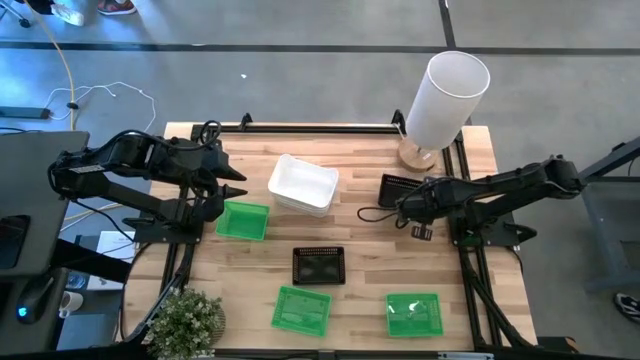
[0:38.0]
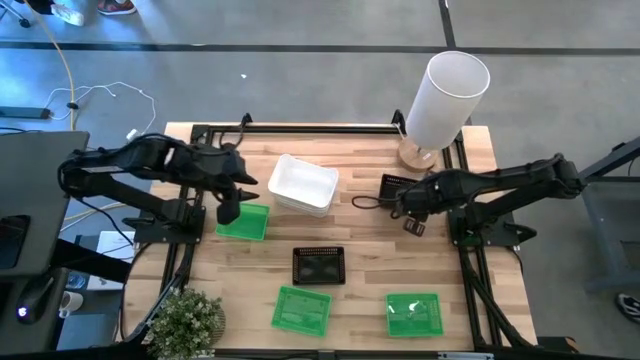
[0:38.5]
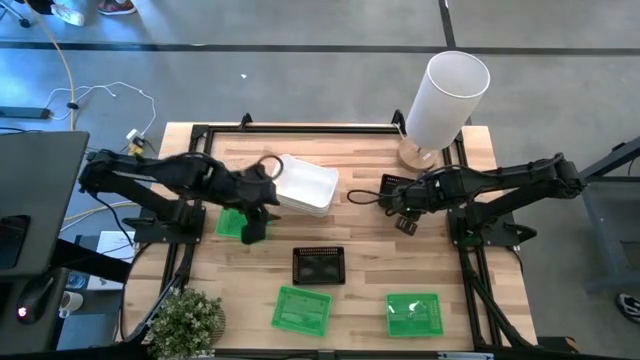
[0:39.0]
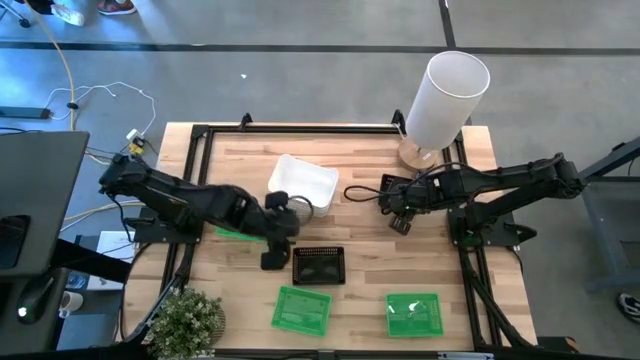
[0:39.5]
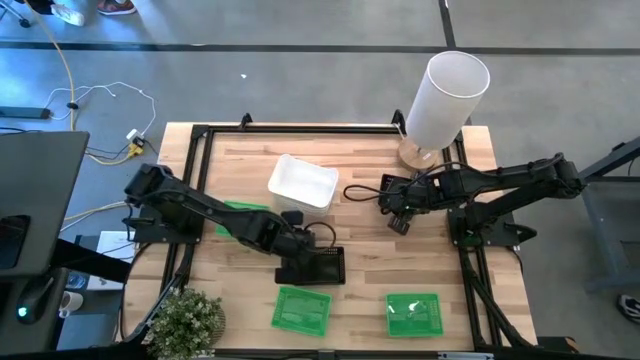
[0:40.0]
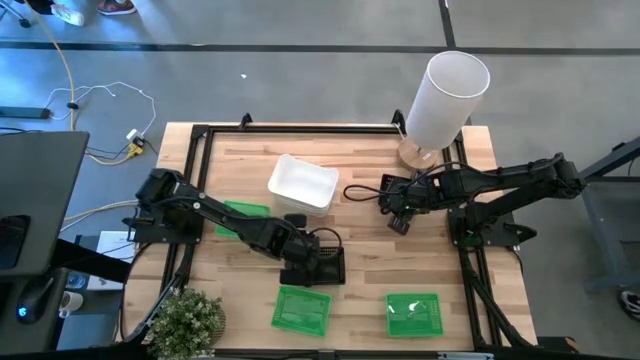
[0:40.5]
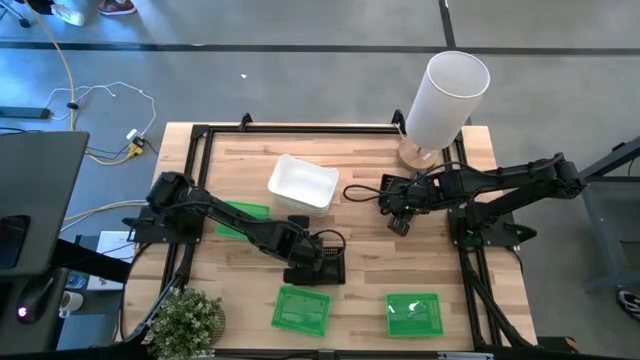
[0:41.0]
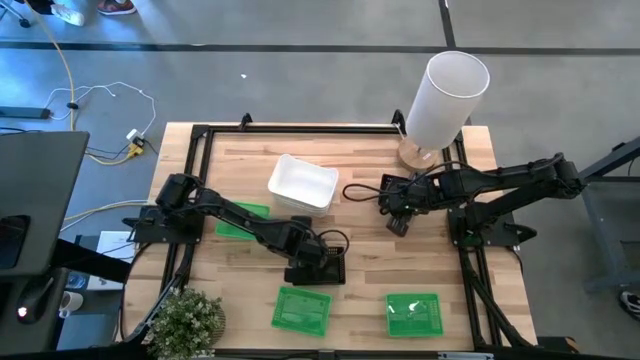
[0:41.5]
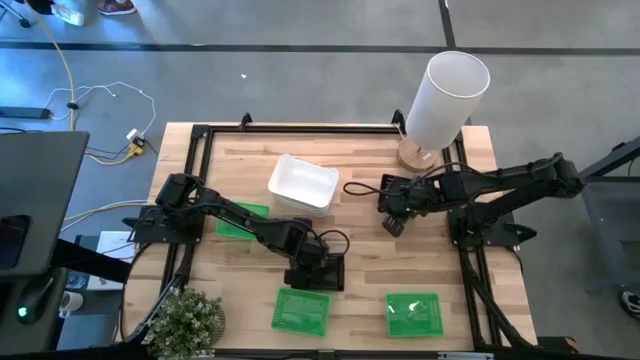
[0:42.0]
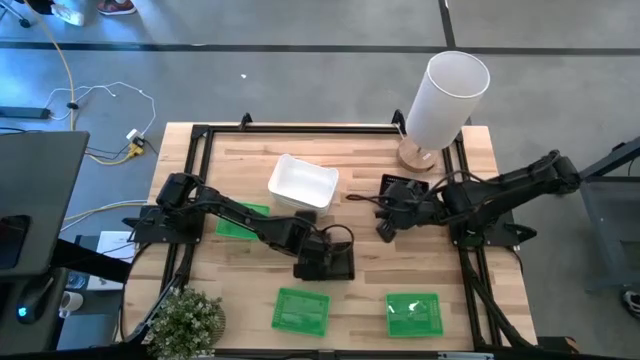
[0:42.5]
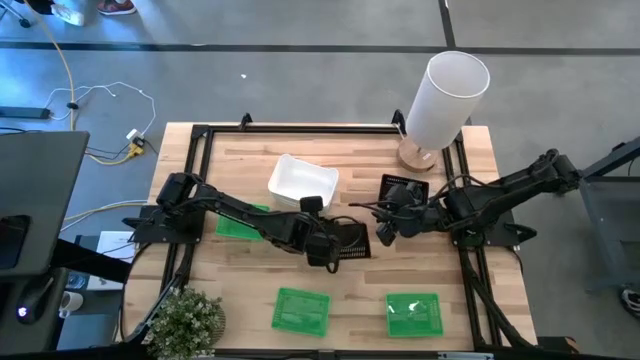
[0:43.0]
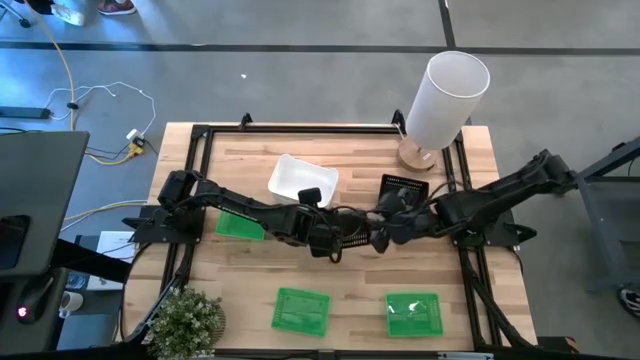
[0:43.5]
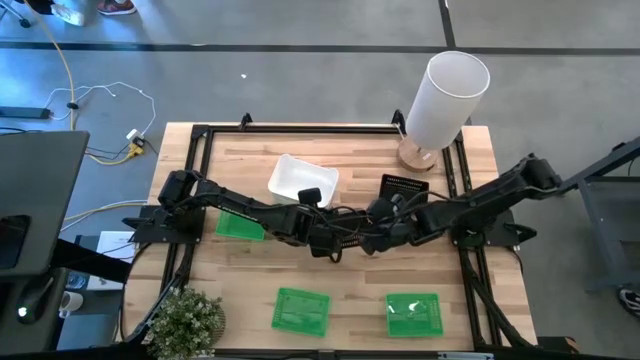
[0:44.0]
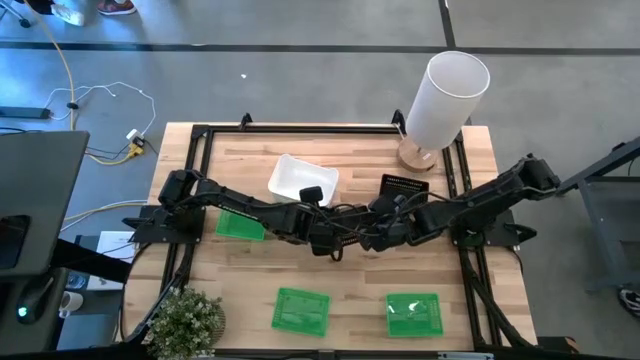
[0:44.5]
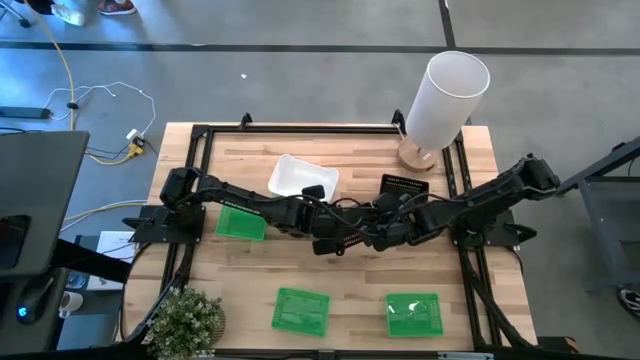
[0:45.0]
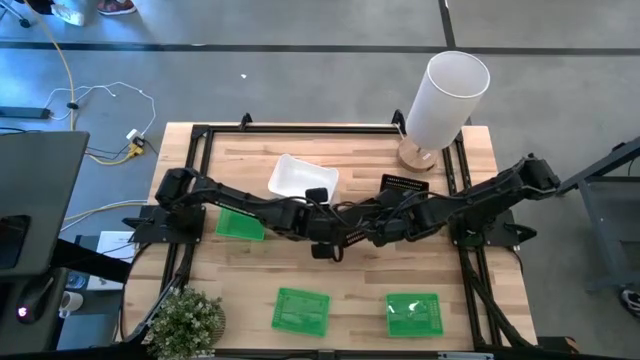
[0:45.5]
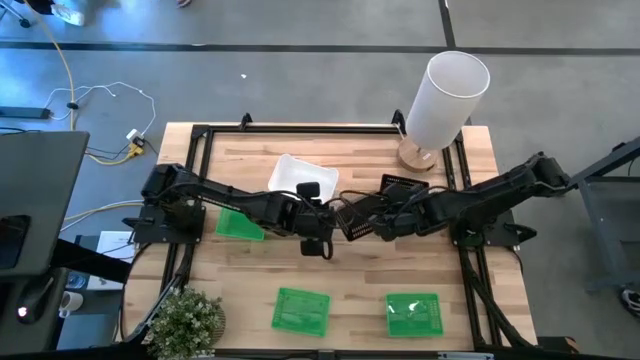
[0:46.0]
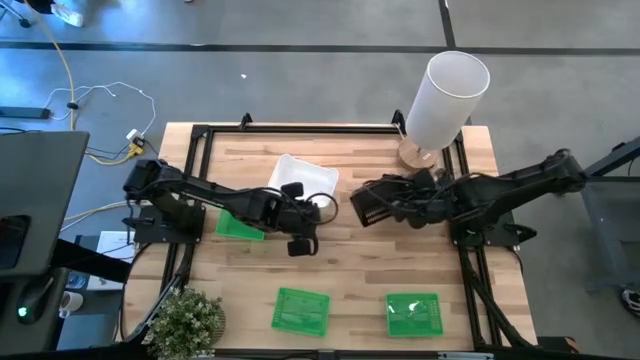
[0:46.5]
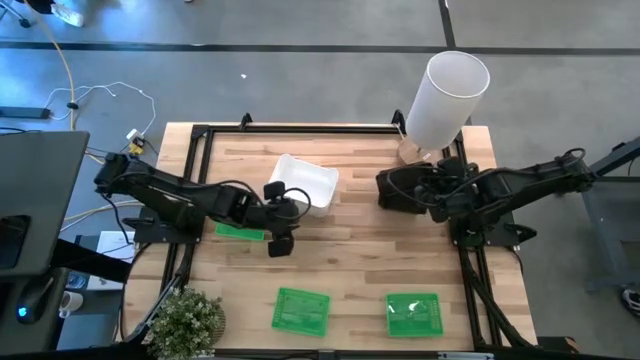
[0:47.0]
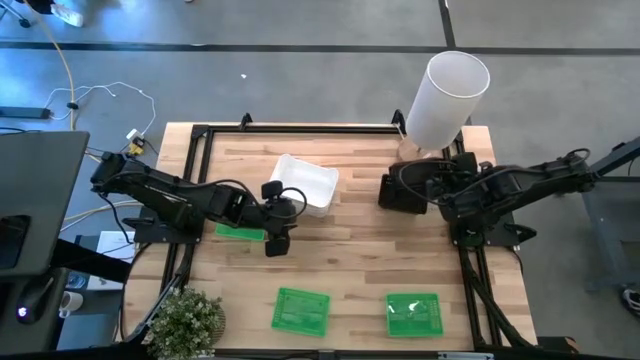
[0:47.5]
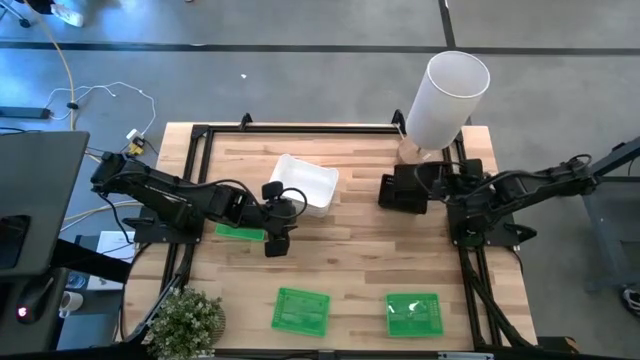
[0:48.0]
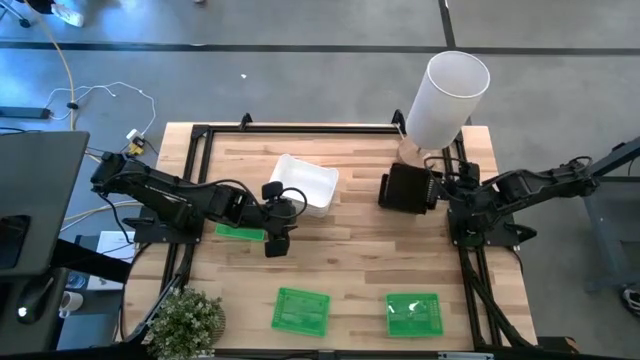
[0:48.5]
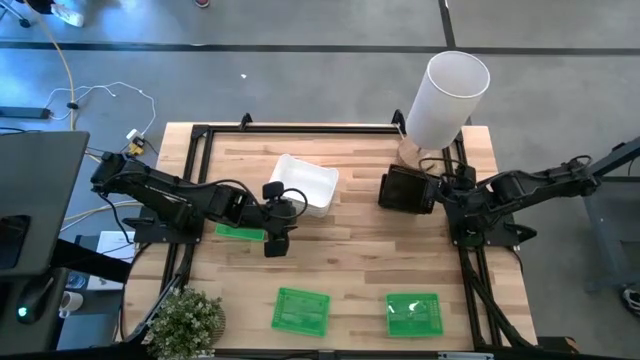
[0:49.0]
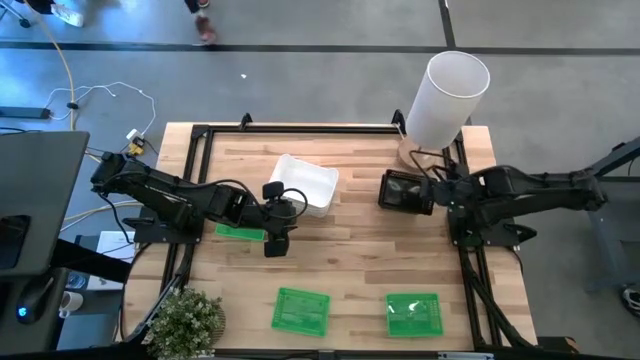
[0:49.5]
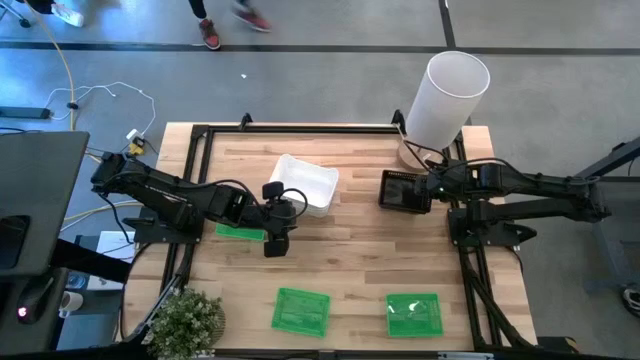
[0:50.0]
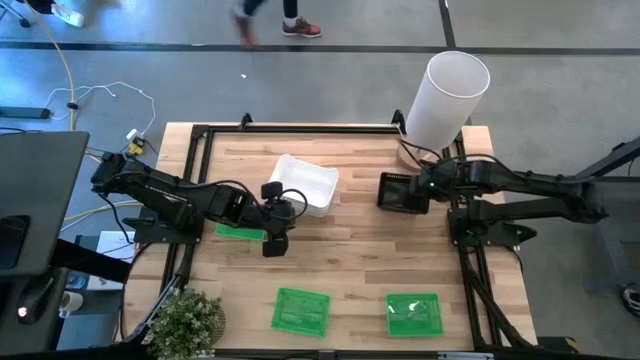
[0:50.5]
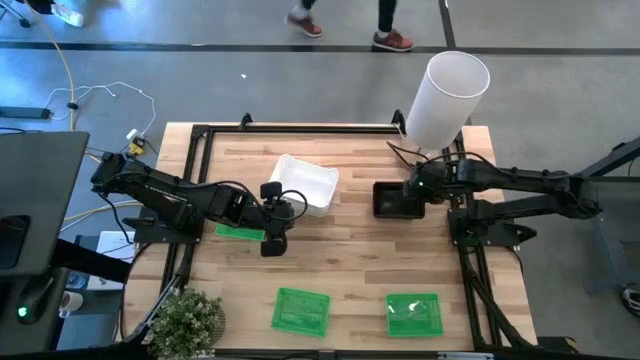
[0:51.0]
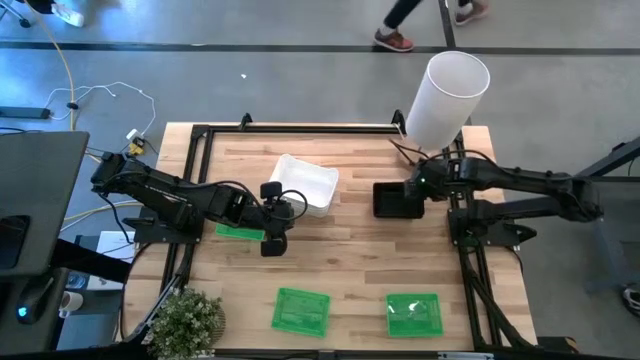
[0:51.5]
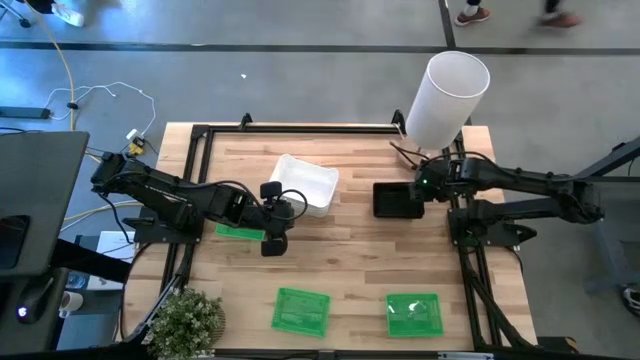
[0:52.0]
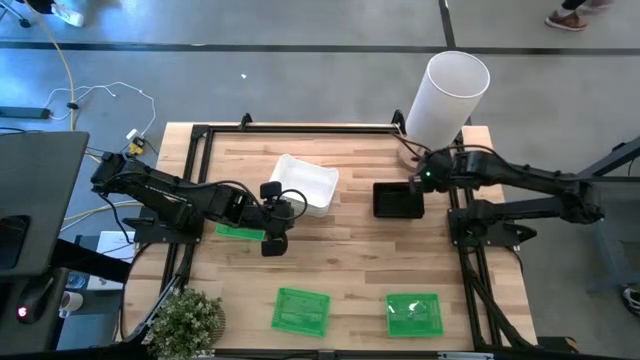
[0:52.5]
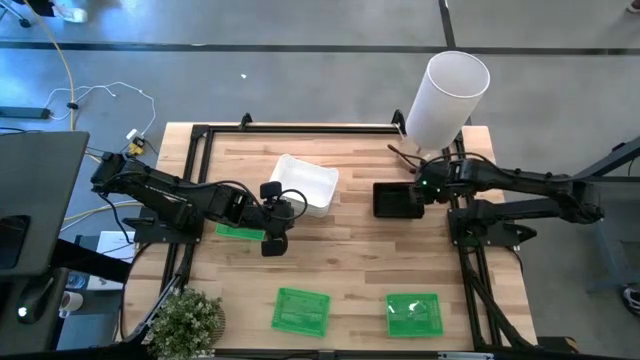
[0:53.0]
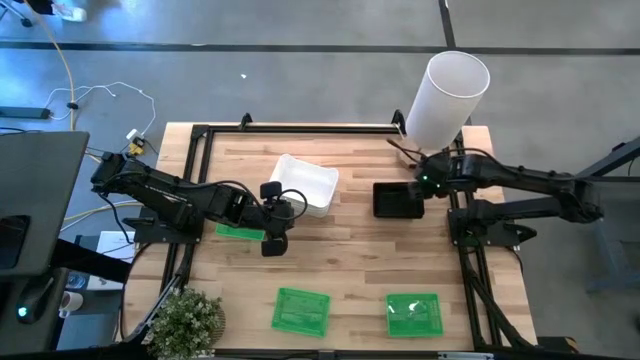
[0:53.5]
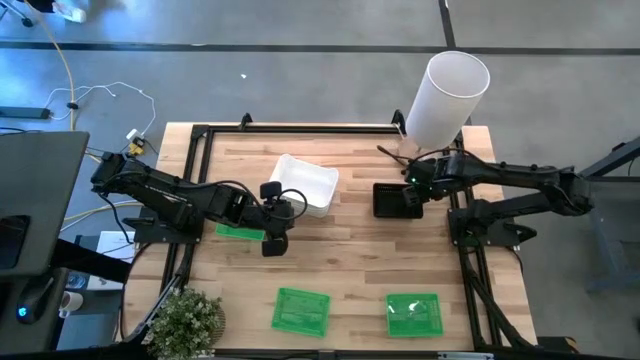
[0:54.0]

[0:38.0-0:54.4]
Stack the bottom black bin on top of the other black bins

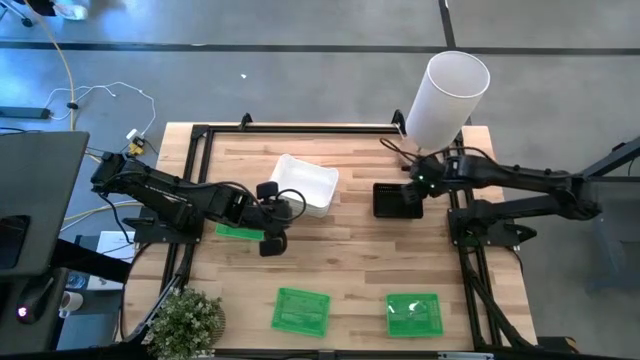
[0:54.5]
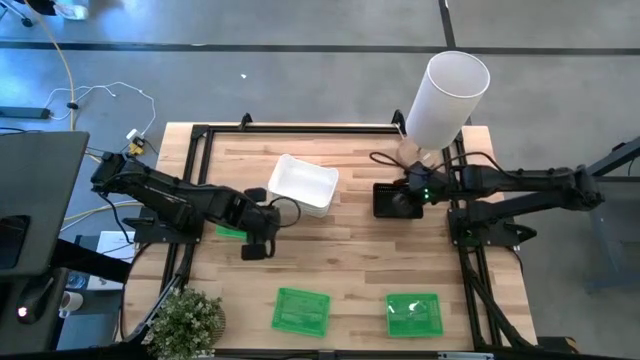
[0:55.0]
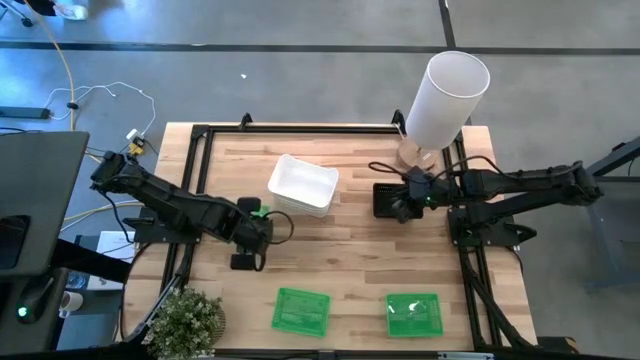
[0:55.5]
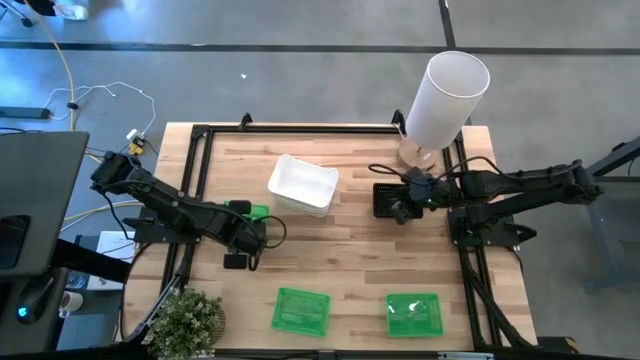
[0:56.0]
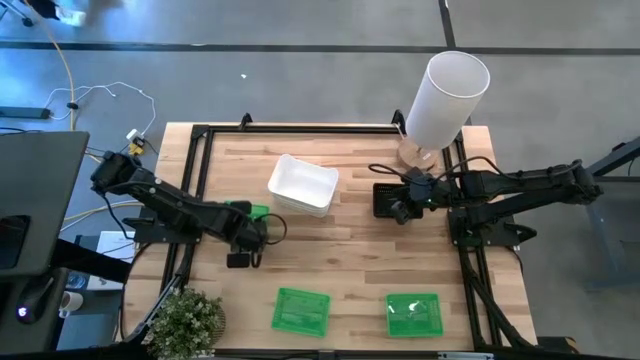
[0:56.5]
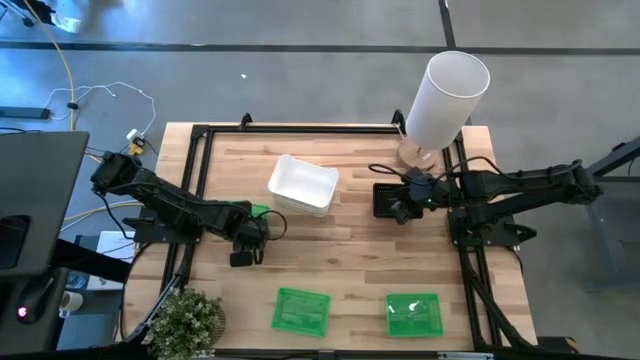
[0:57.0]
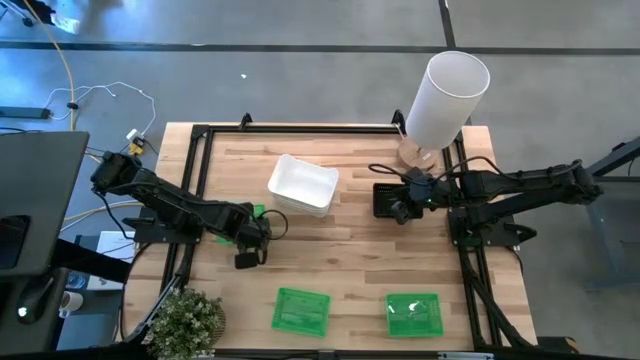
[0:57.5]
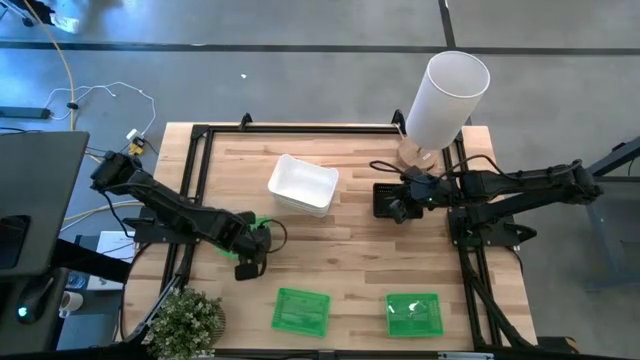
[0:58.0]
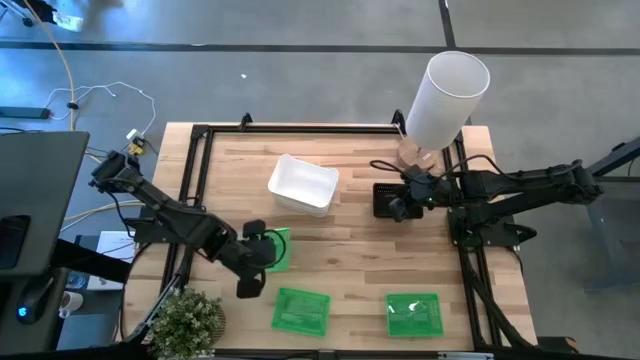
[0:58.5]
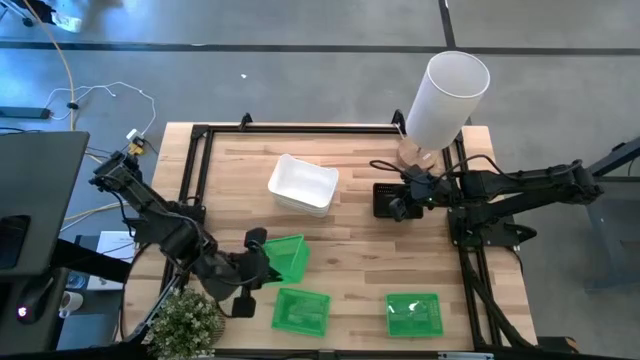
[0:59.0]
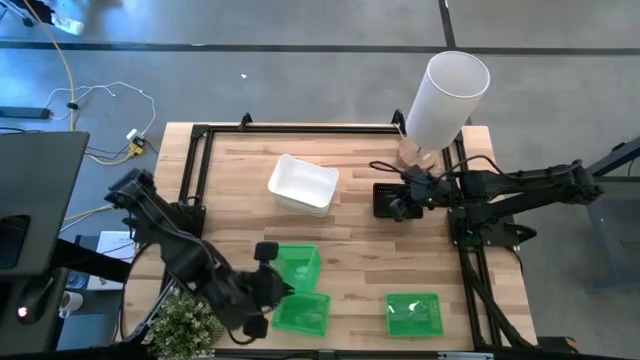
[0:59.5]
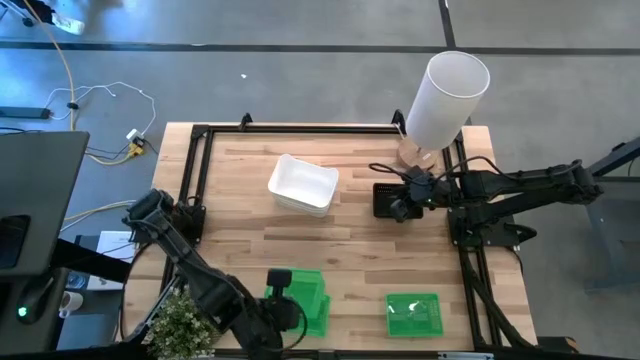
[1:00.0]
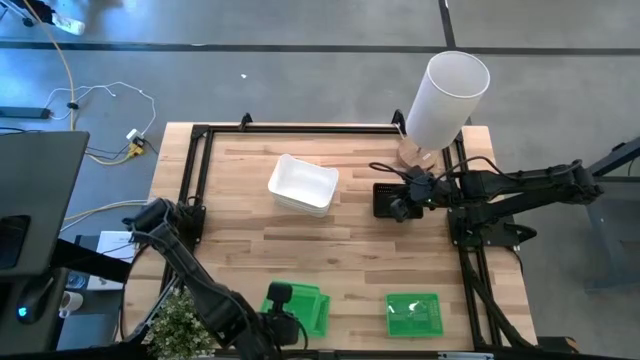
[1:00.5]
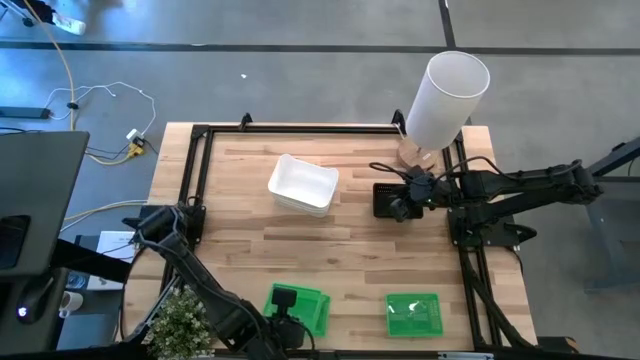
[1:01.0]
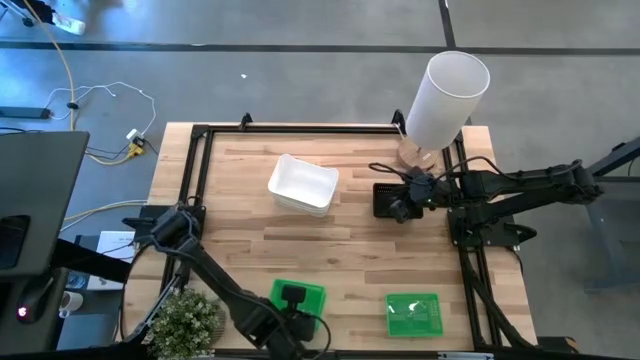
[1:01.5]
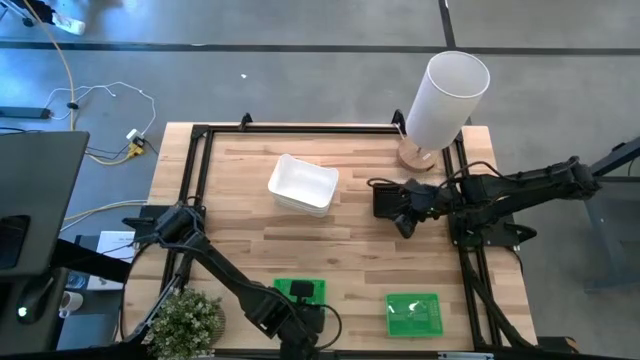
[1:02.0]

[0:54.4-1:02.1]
Stack the top green bin on top of the other bottom left green bin
